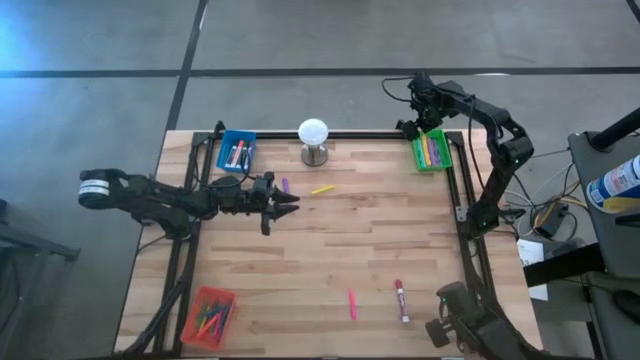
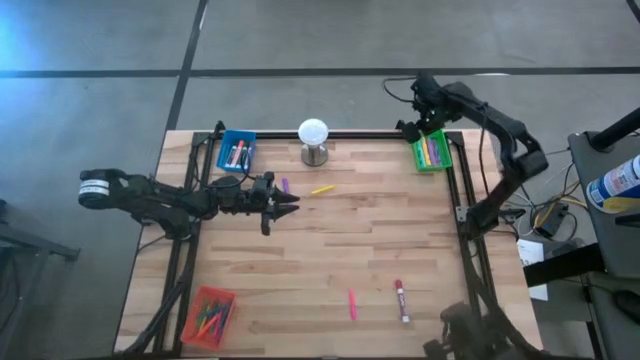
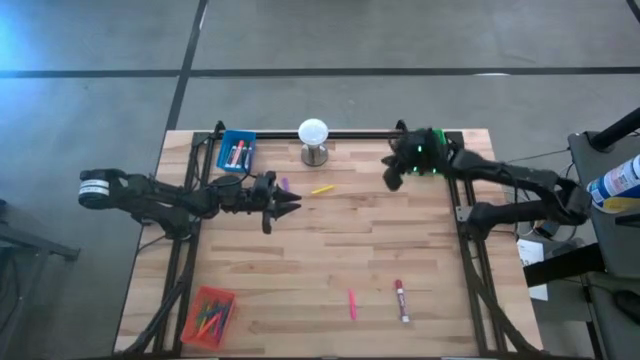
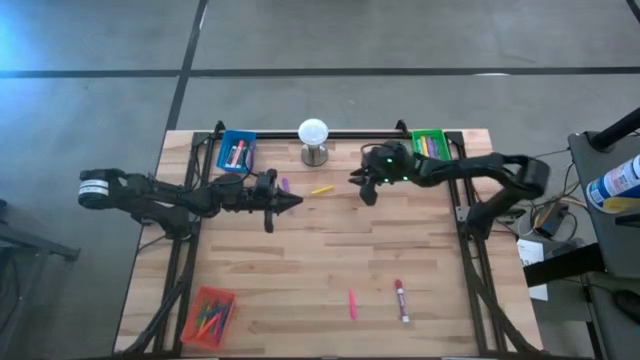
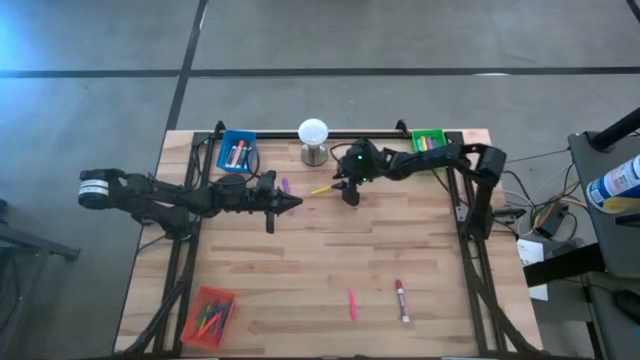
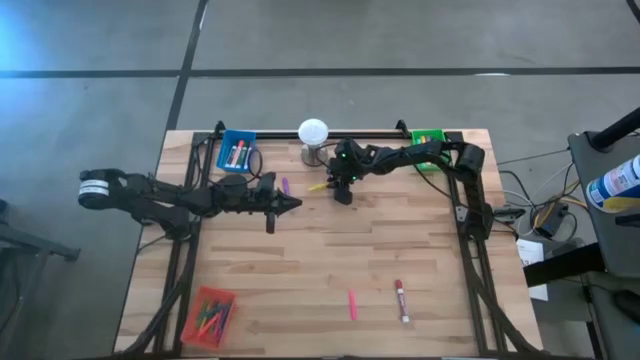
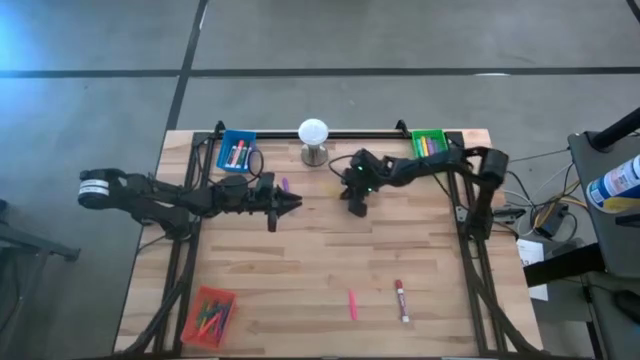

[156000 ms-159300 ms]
Task: Pick & Place Markers
Put the yellow pen into the orange bin

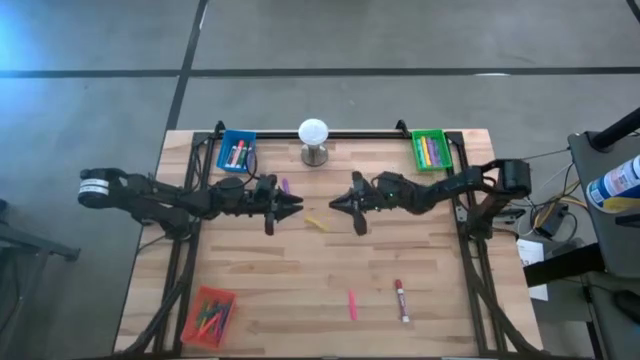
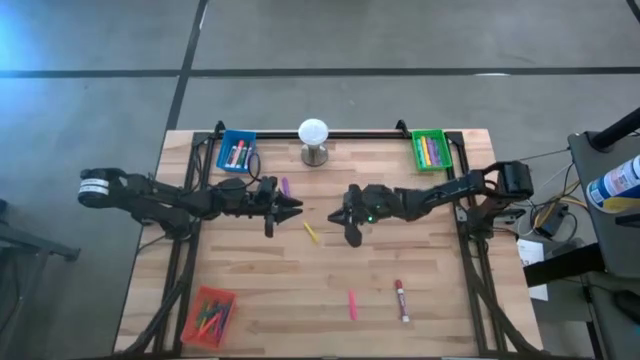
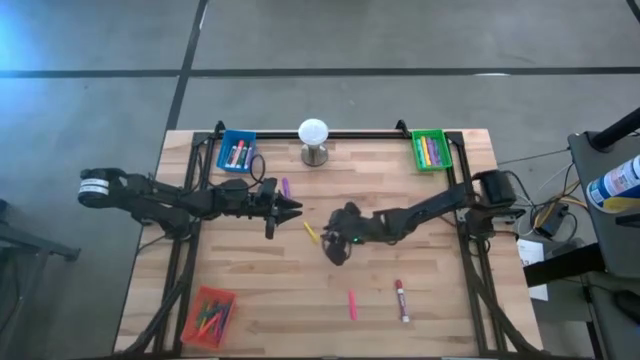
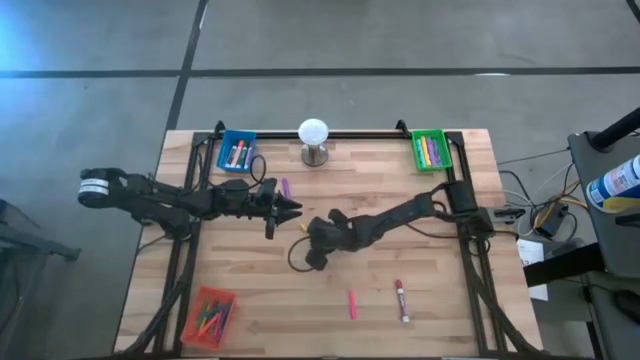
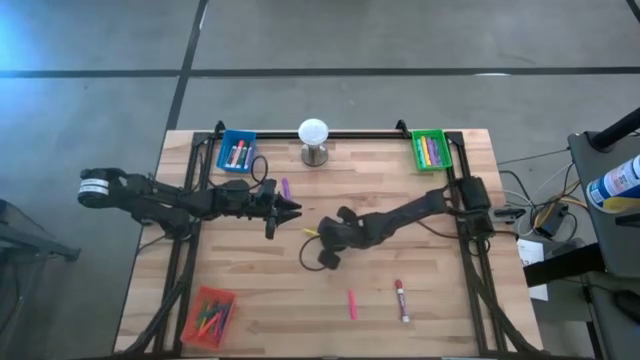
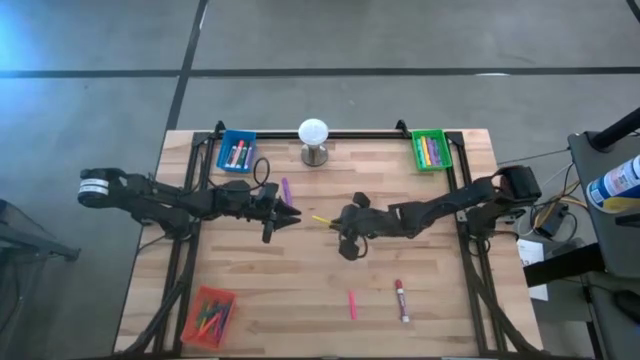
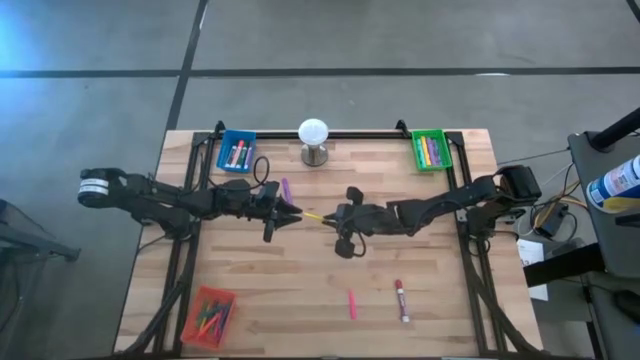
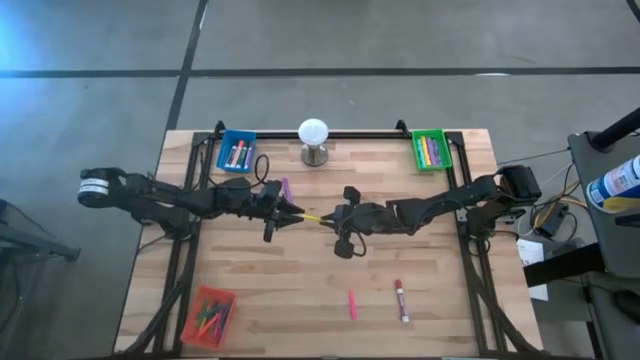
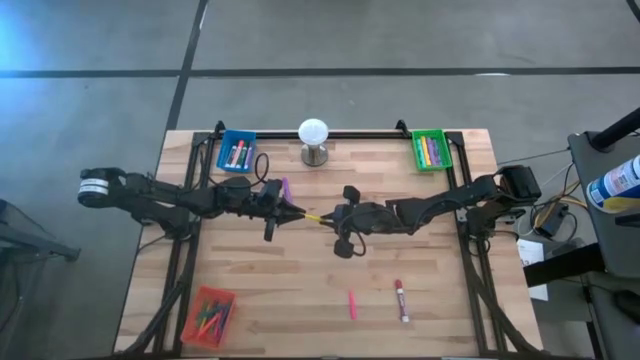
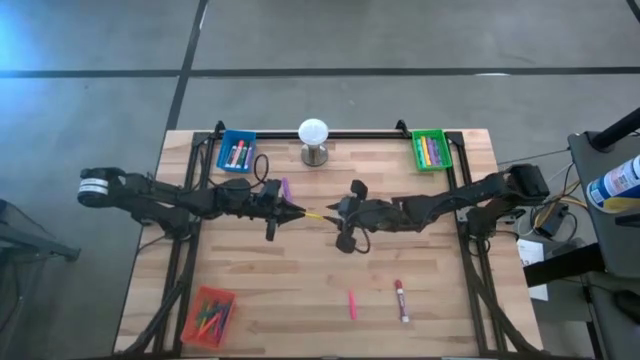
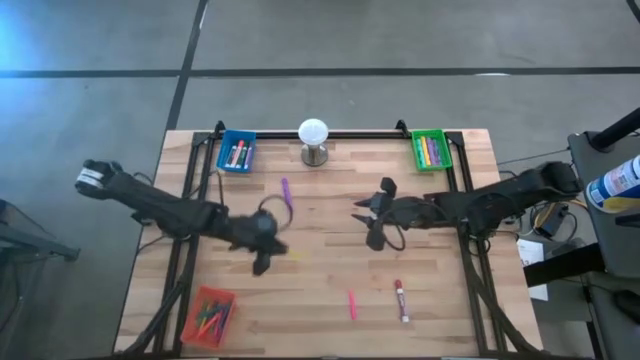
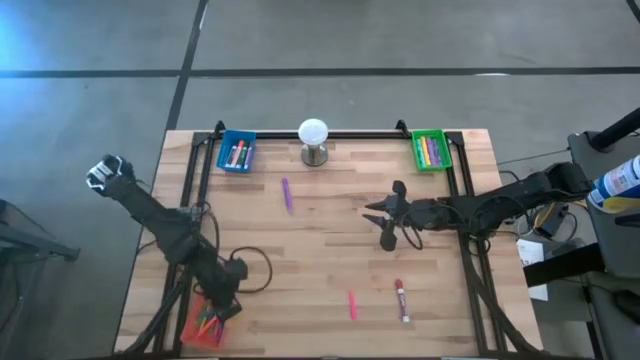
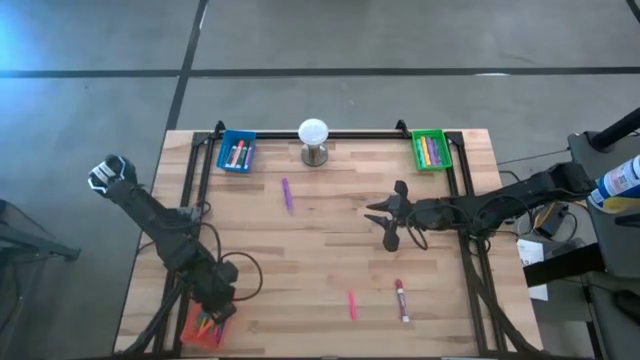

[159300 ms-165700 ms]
Put the yellow pen into the orange bin

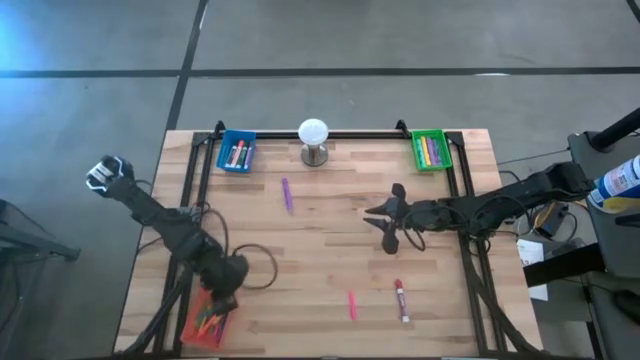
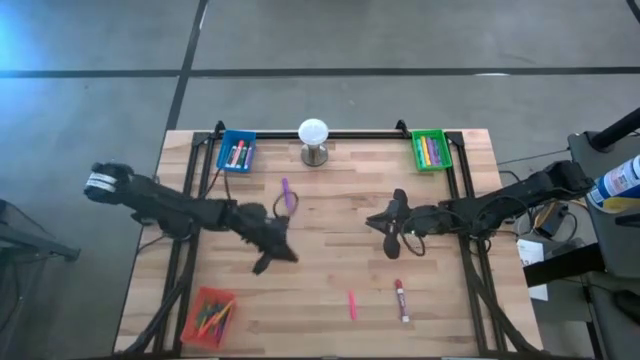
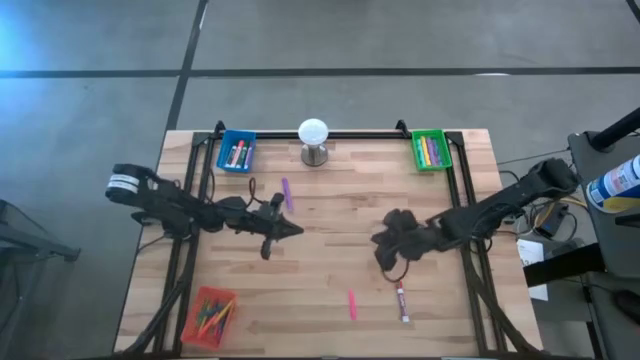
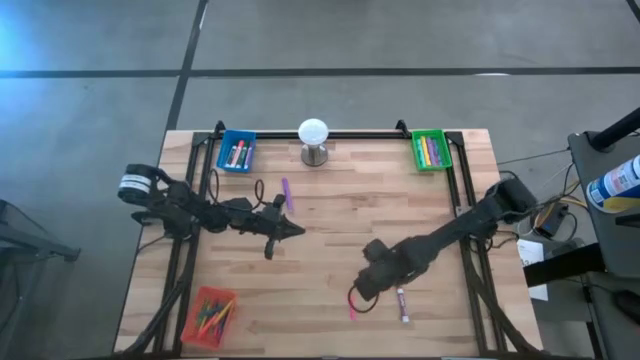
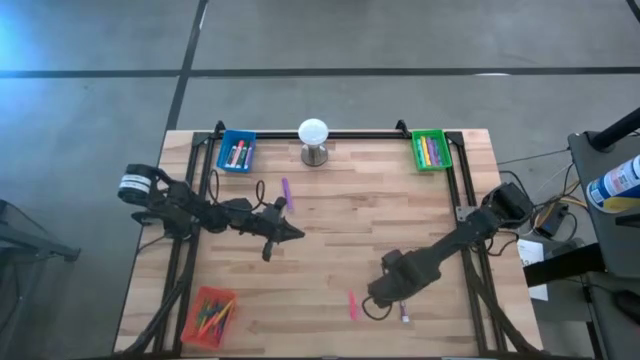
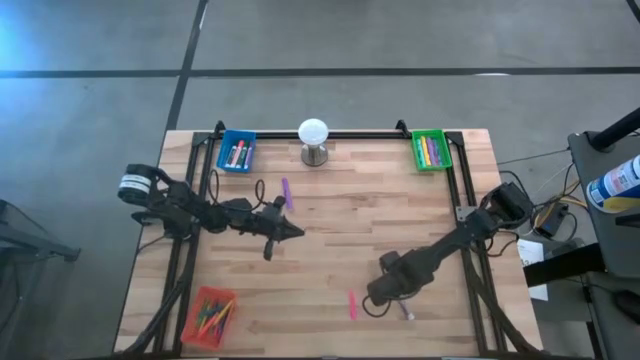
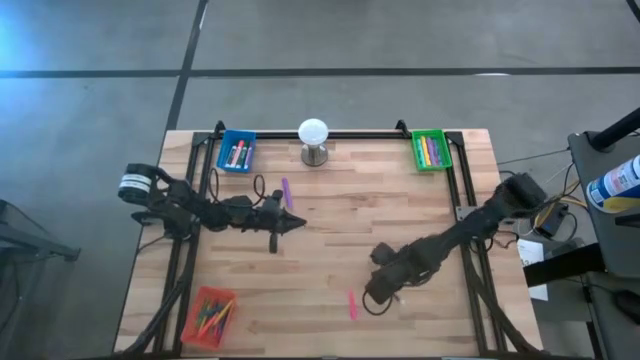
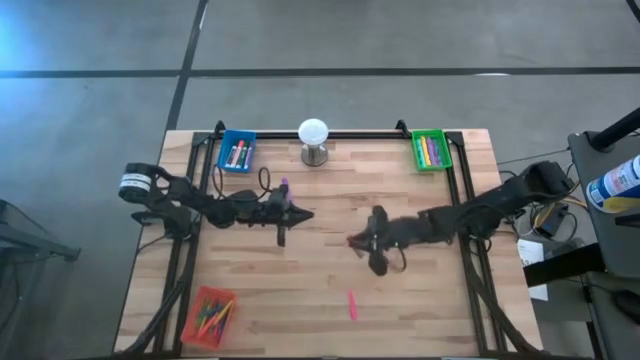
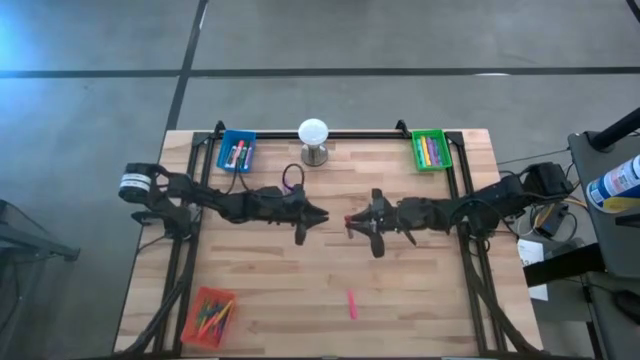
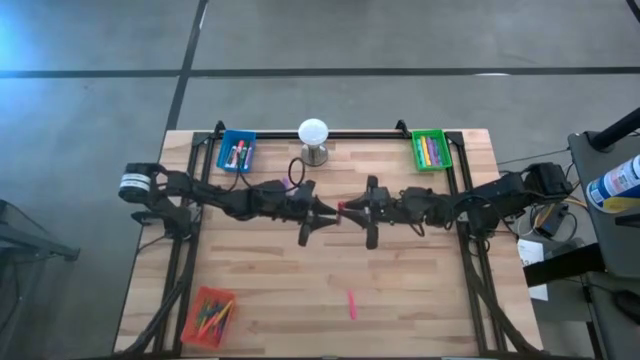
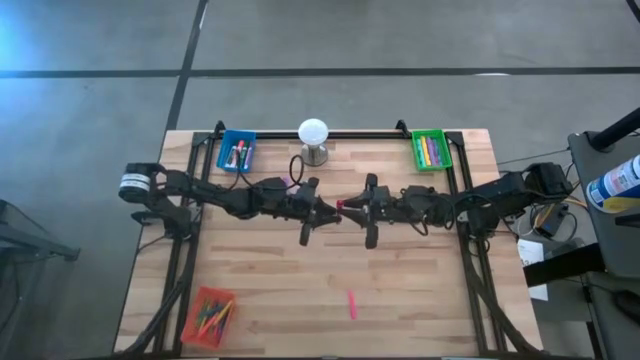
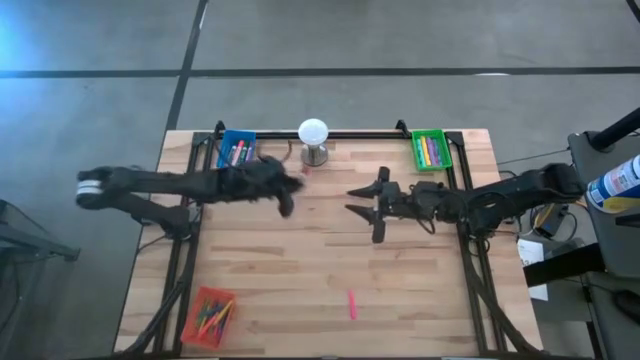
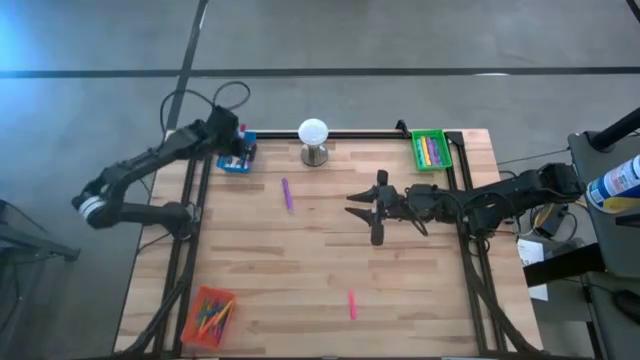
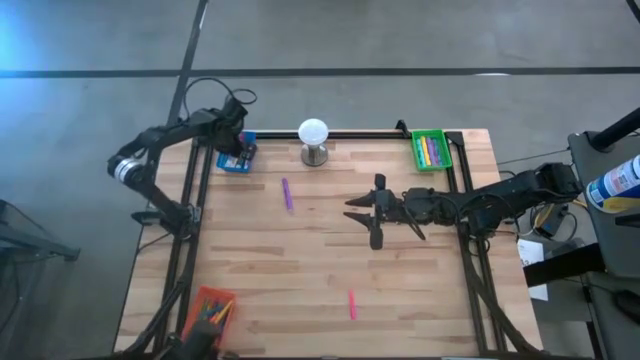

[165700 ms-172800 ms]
Put the red marker pen into the blue bin

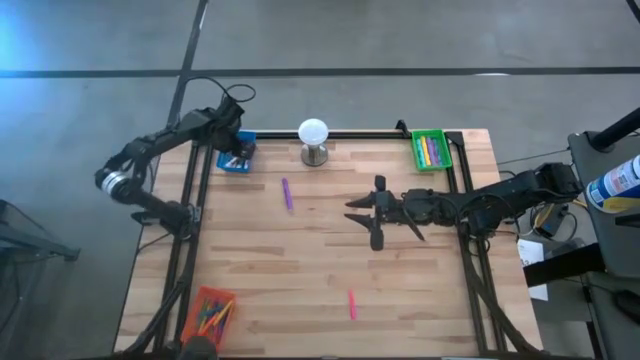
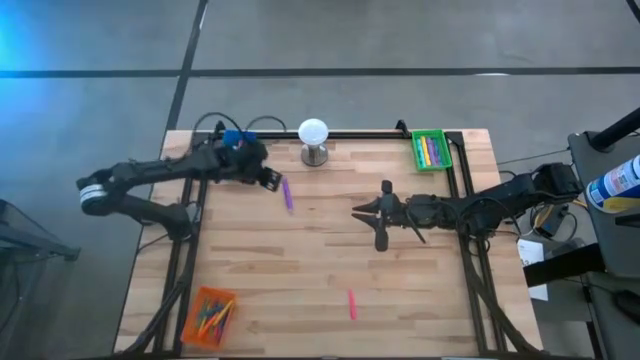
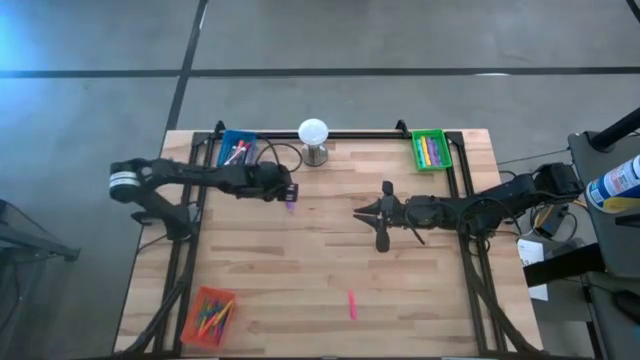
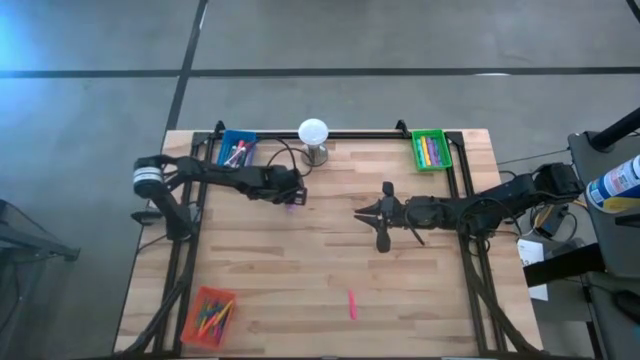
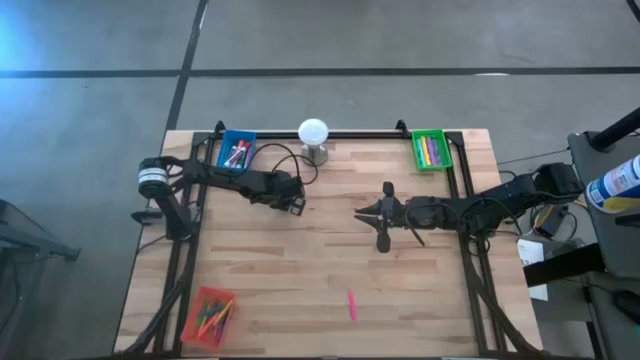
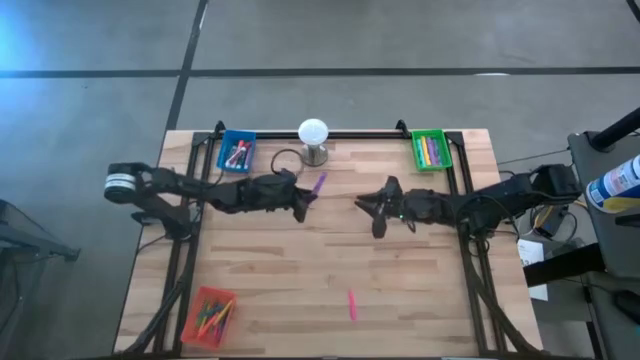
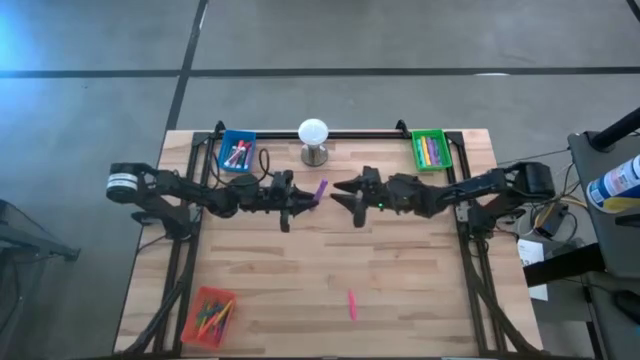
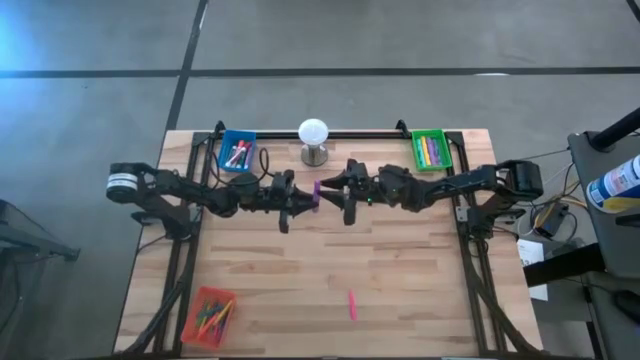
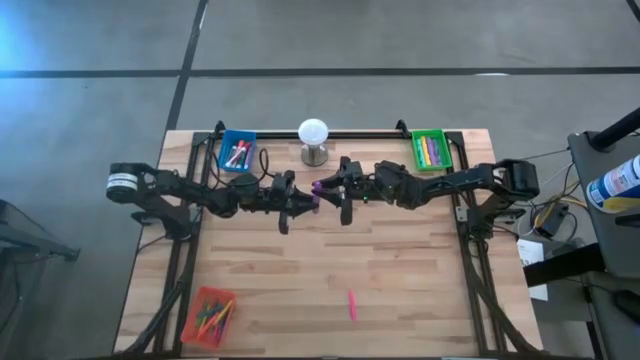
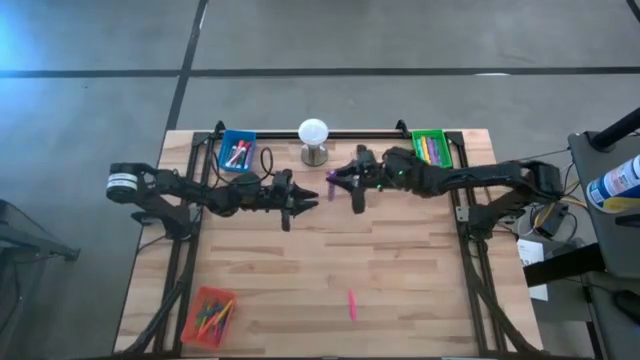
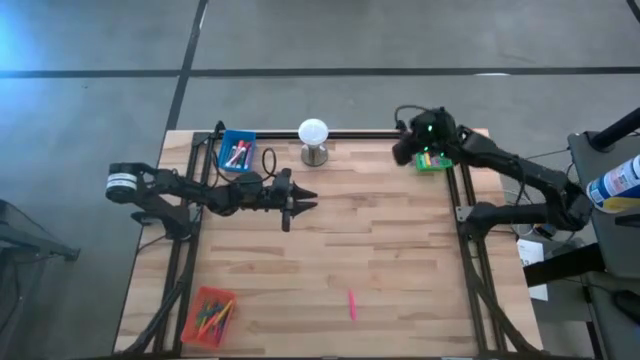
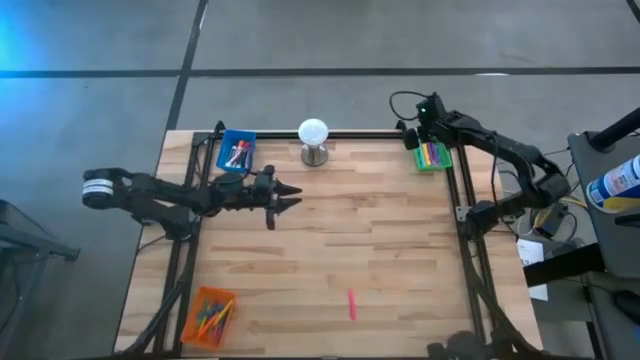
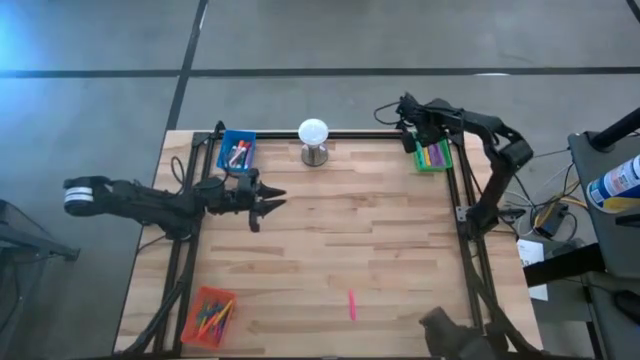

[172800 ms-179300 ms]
Put the violet highlighter pen into the green bin
